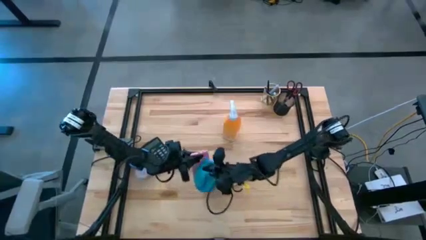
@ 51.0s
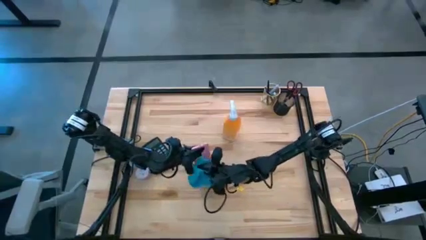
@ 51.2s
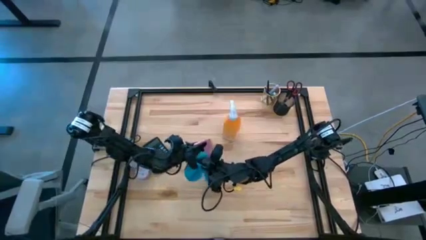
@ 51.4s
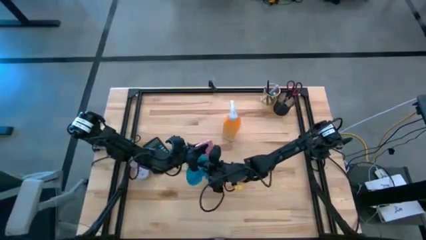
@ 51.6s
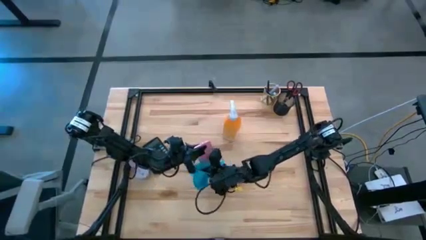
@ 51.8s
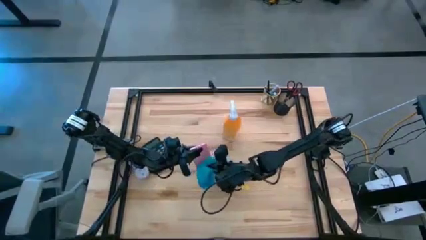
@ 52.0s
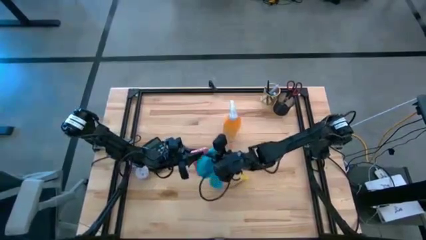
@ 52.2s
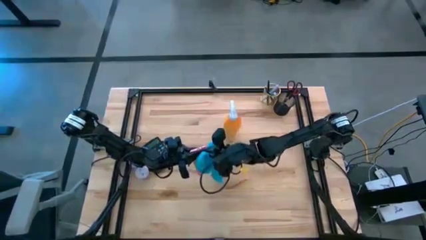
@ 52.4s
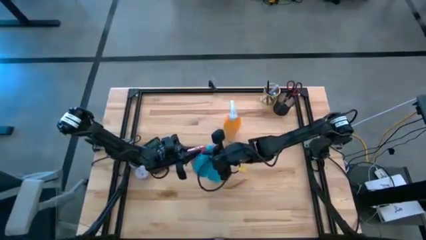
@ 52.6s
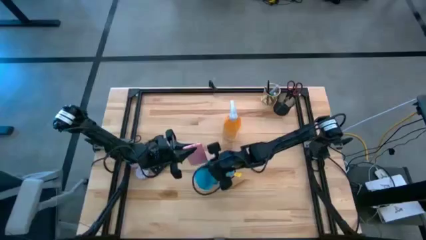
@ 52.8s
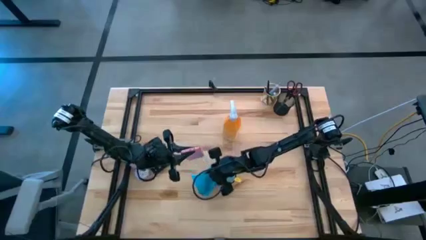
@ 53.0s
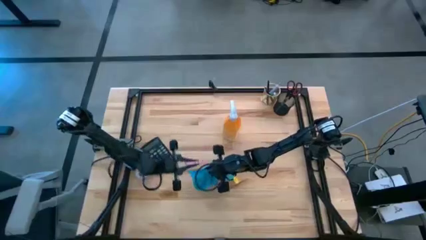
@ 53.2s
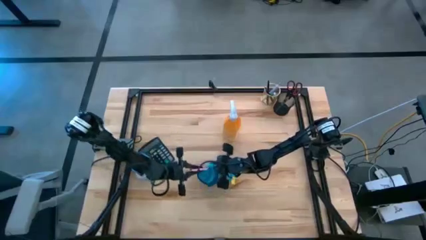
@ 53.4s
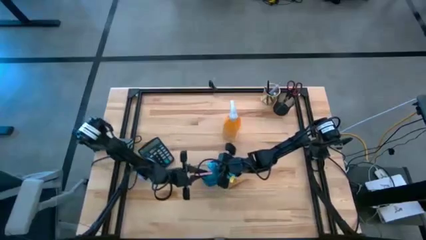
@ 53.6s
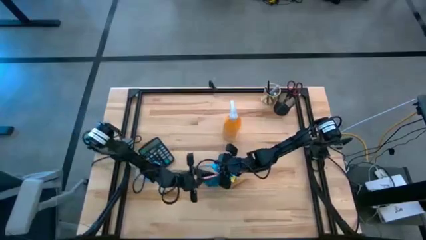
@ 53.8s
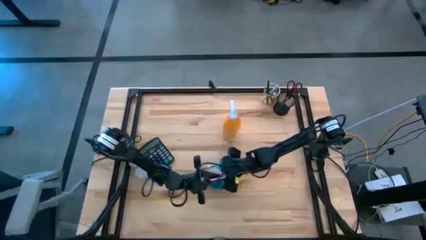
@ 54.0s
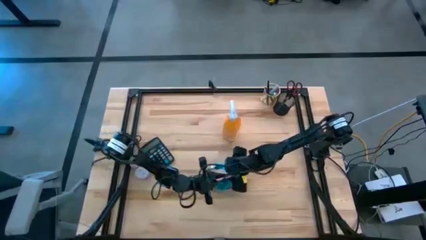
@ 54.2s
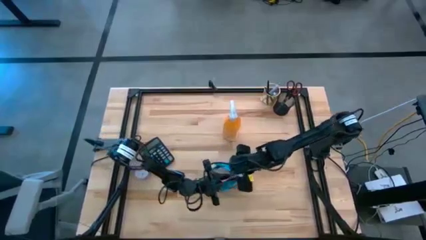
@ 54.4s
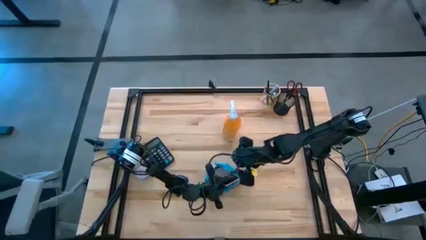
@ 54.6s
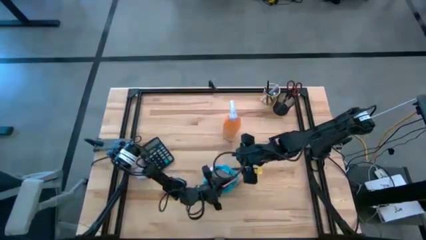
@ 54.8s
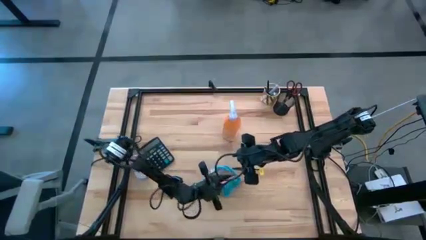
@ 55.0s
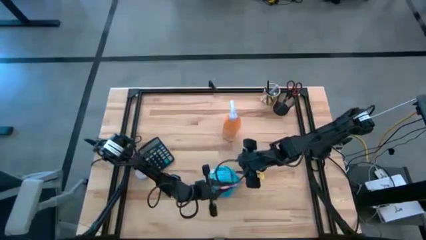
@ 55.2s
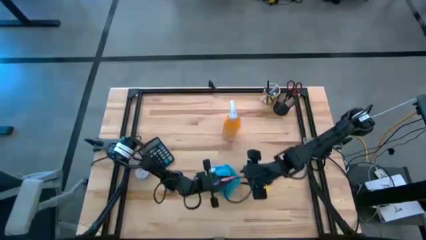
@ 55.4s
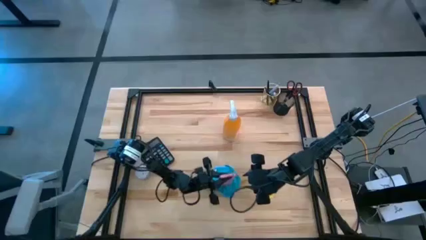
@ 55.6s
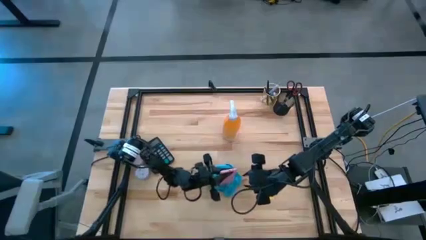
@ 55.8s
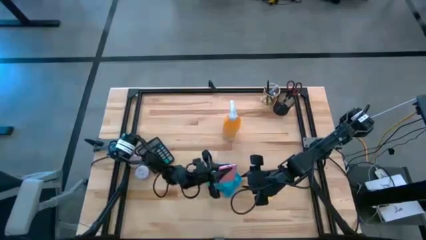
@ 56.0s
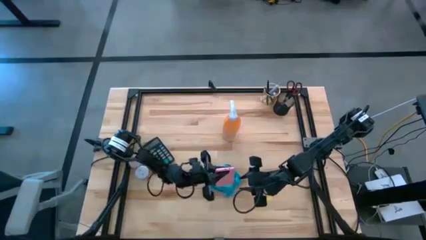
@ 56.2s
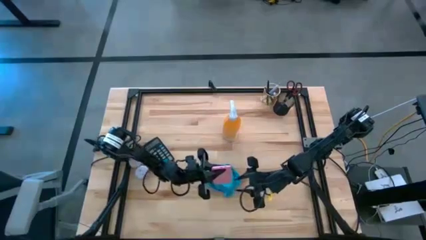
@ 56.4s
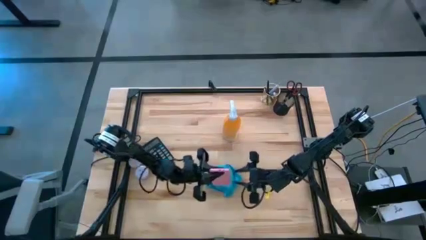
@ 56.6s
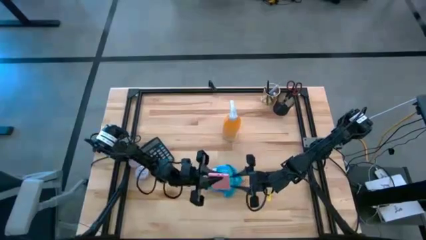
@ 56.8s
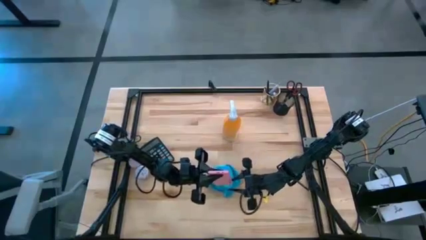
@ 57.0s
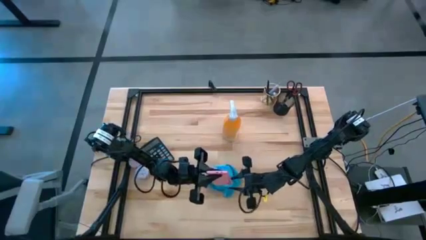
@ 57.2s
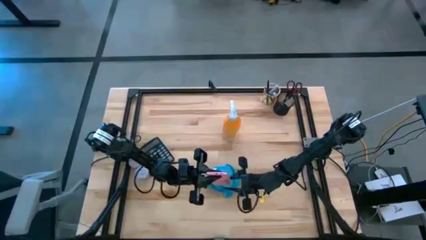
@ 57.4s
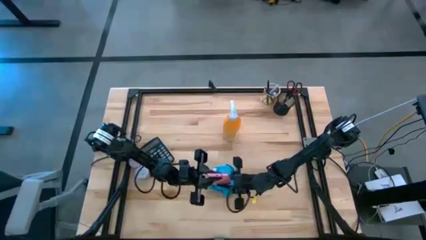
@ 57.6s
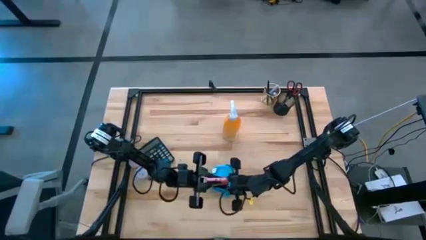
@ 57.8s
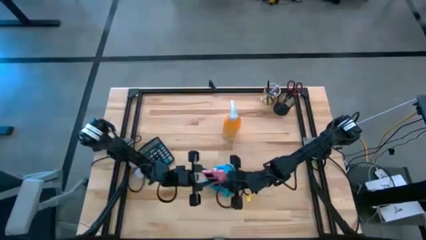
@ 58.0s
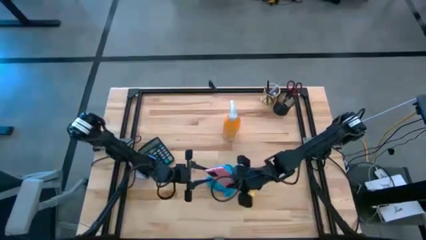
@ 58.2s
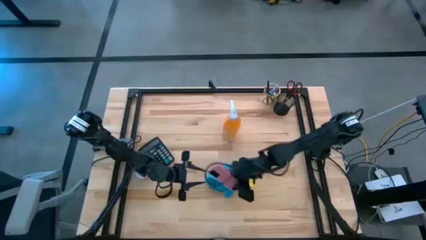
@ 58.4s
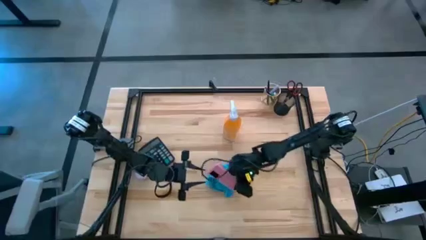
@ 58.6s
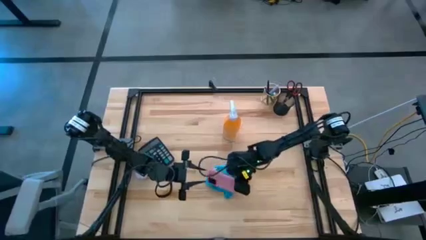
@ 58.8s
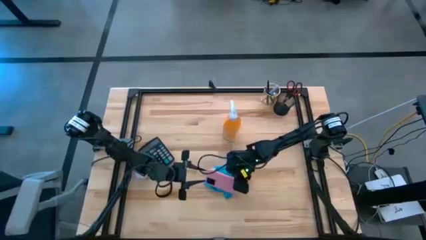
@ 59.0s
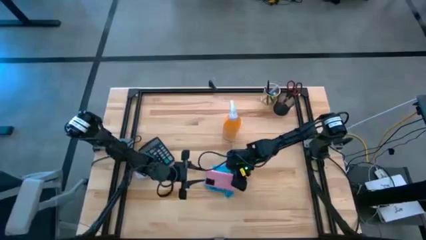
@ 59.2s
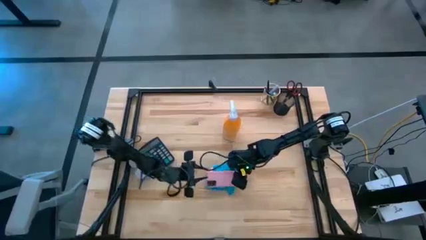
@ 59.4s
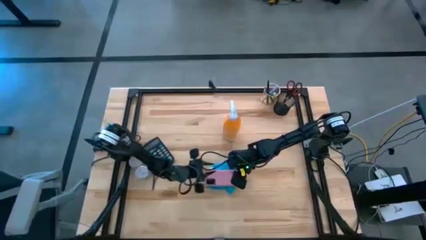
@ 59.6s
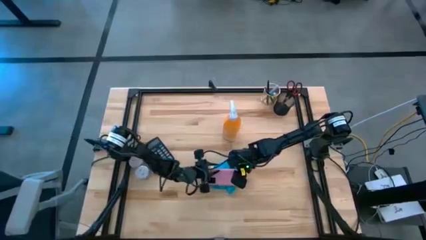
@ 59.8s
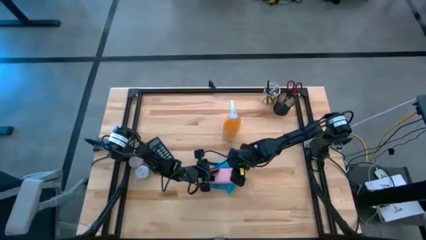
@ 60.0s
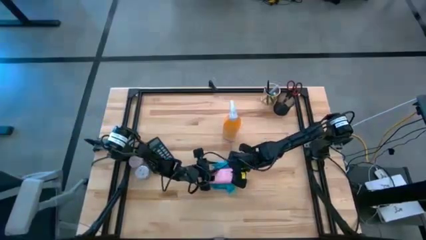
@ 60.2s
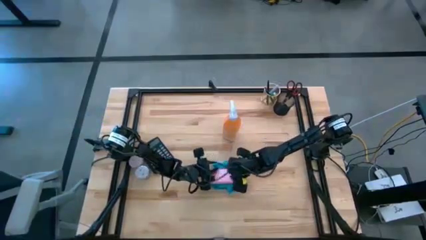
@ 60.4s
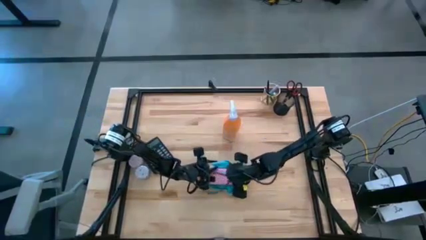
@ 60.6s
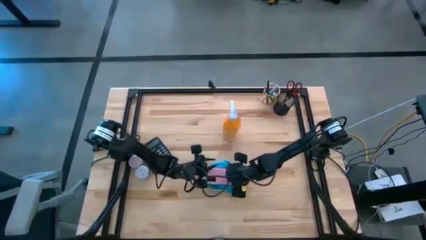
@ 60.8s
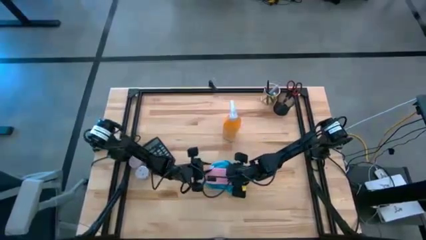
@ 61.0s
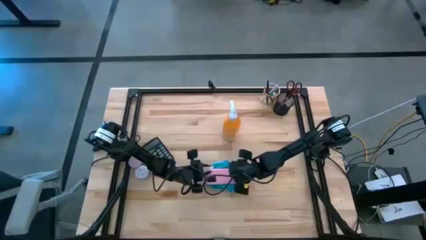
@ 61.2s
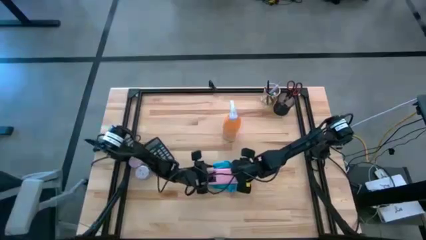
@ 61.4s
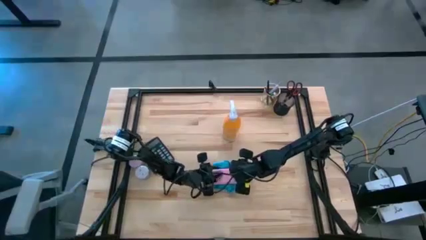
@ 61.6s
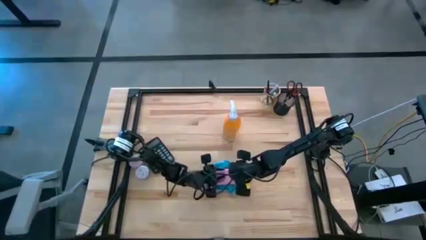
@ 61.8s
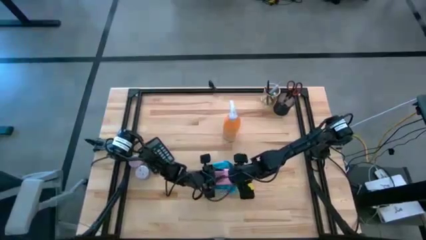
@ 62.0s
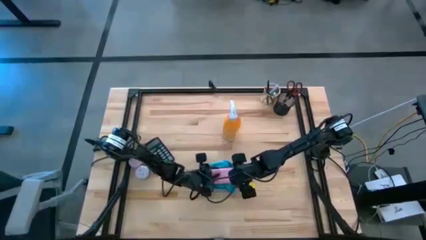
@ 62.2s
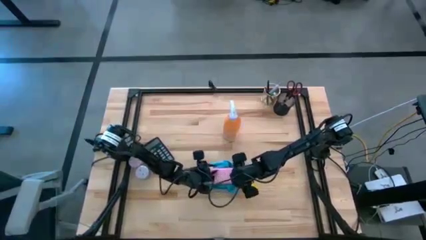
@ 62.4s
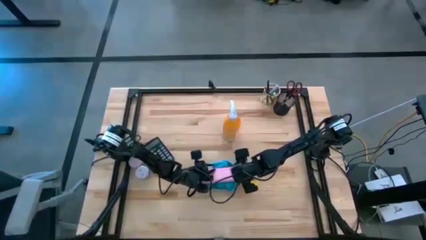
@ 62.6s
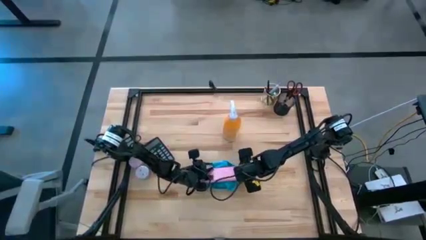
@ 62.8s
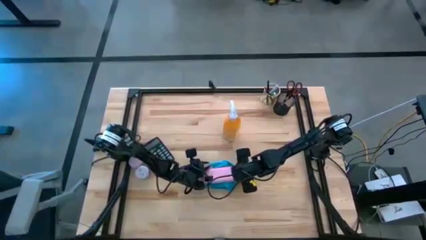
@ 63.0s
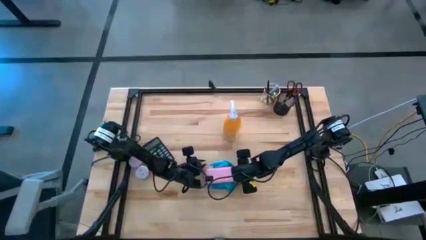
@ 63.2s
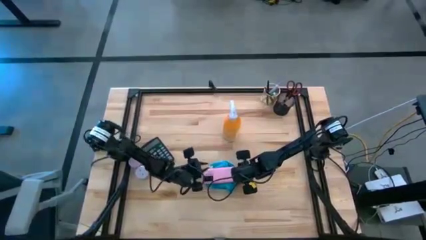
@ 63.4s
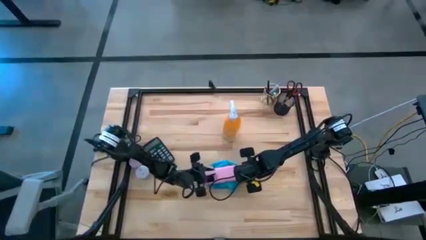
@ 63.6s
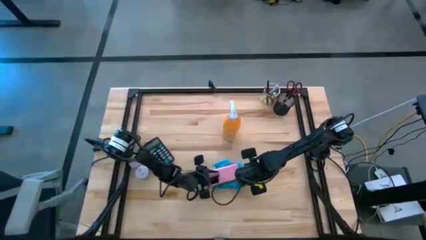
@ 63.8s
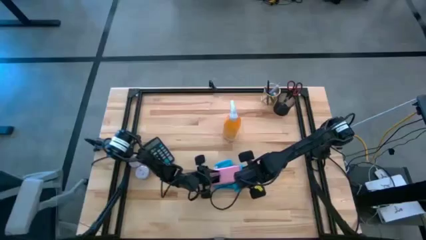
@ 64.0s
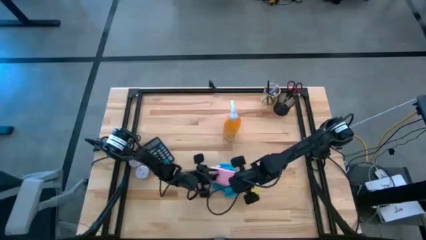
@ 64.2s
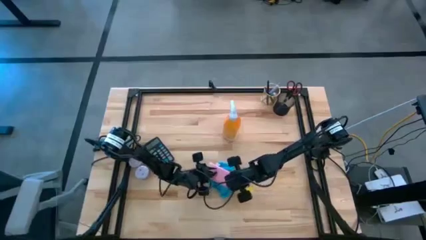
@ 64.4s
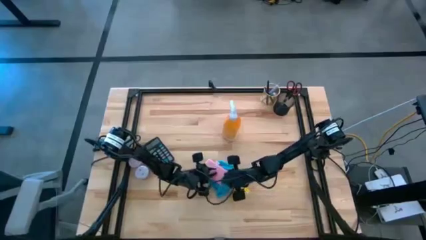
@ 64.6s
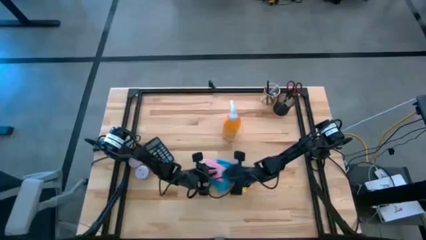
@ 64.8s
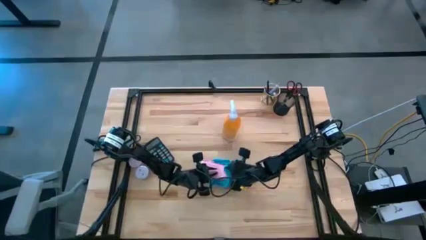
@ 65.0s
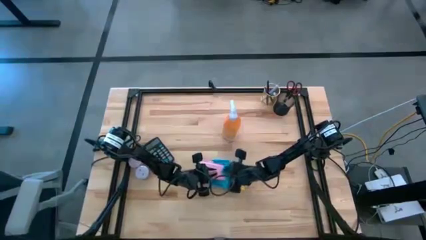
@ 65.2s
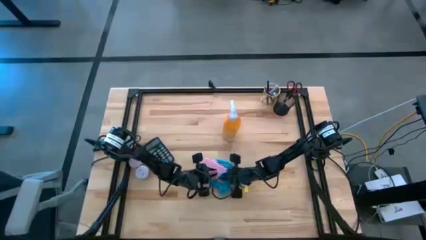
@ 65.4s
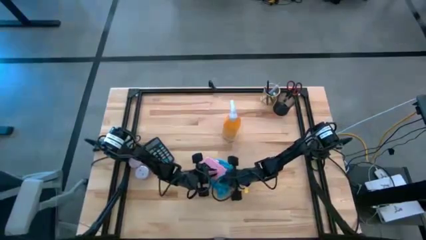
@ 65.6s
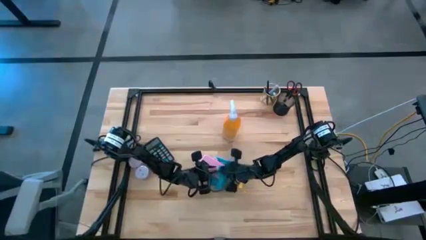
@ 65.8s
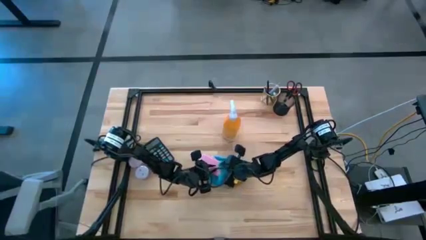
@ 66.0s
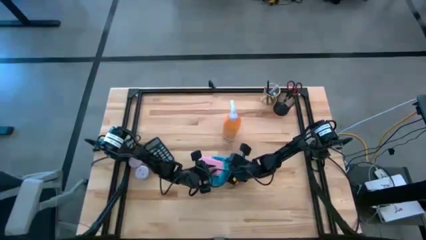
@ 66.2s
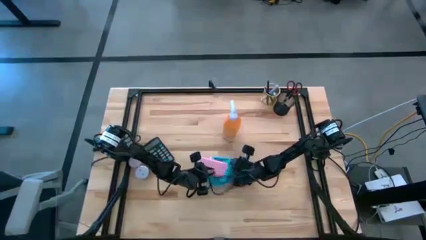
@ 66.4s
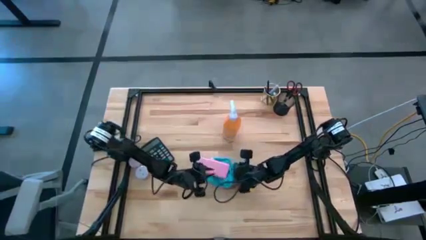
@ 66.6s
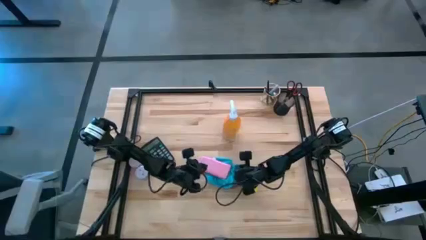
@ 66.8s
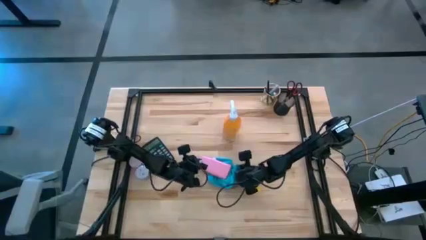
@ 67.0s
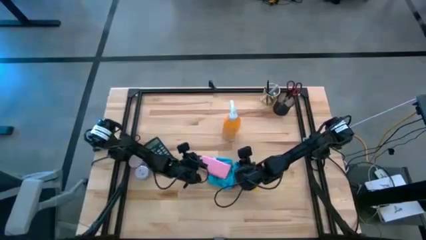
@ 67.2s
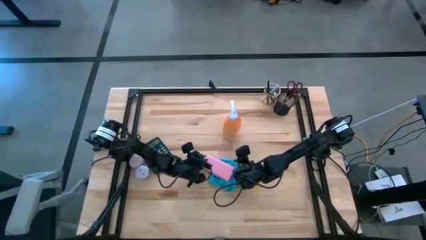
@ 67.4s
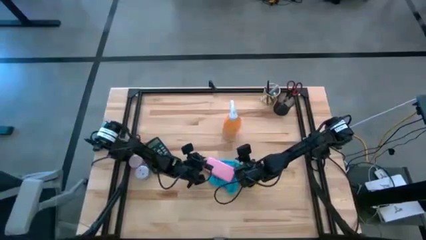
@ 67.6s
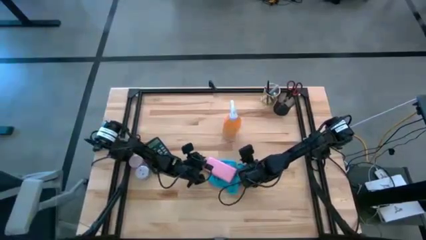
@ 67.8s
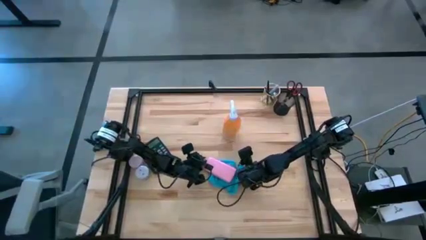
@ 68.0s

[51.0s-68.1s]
Task: Apply microfiber cloth
Wipe the pink cellphone with the blue microfiber cloth
